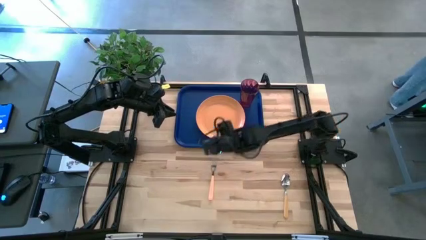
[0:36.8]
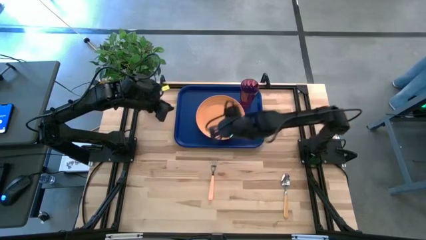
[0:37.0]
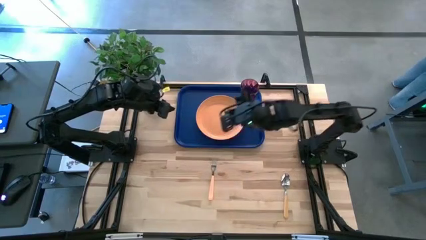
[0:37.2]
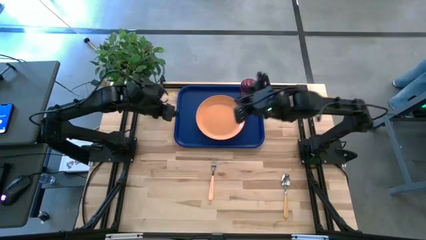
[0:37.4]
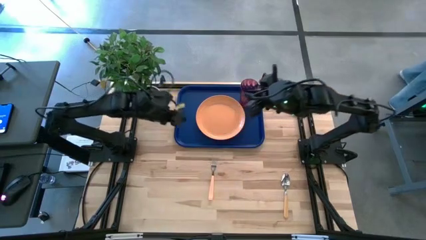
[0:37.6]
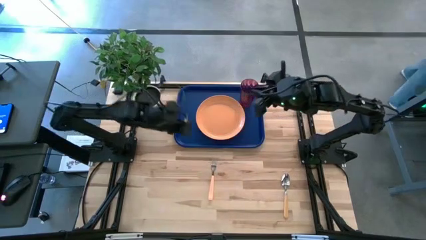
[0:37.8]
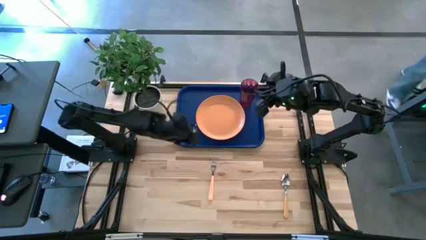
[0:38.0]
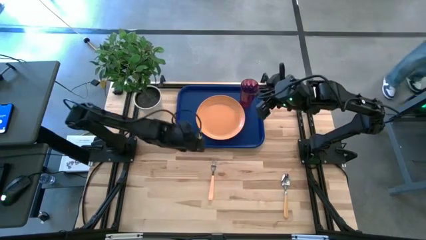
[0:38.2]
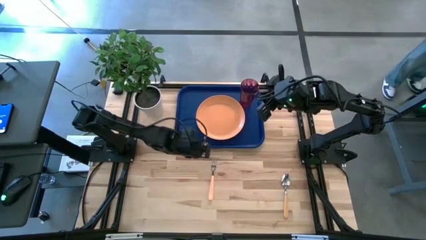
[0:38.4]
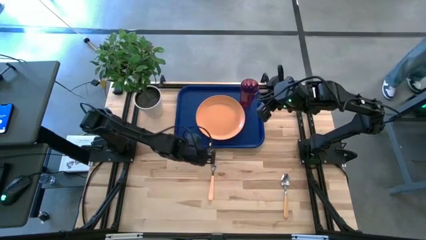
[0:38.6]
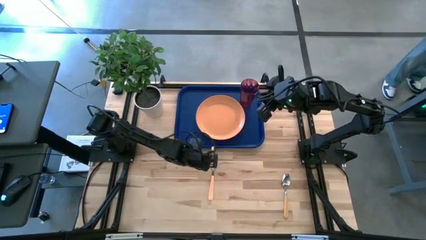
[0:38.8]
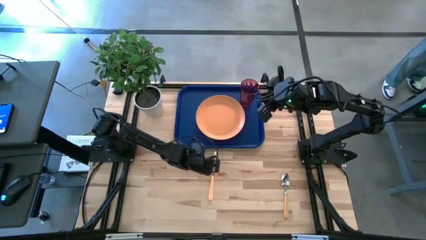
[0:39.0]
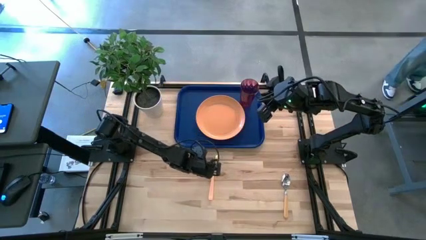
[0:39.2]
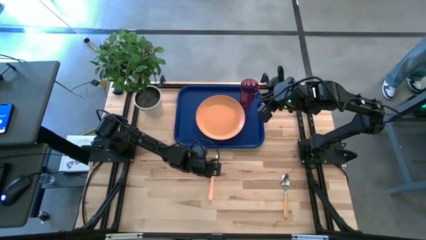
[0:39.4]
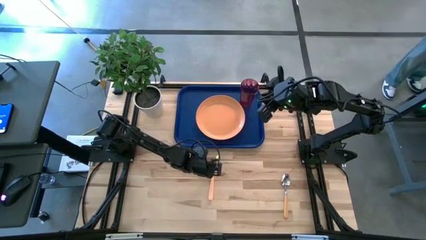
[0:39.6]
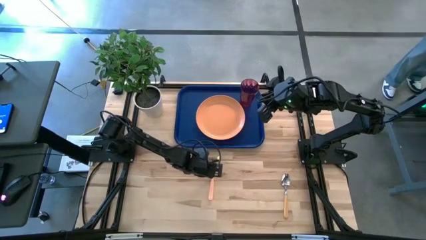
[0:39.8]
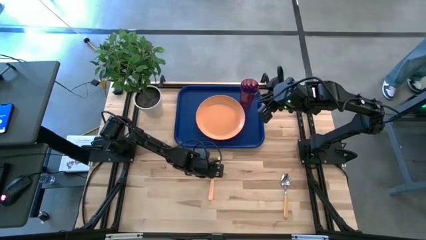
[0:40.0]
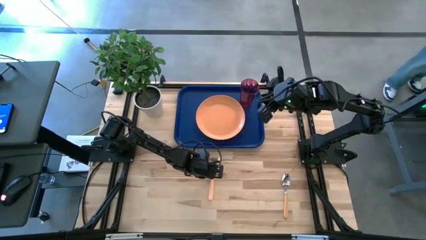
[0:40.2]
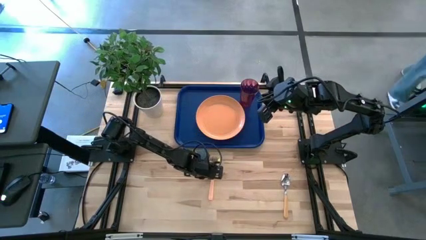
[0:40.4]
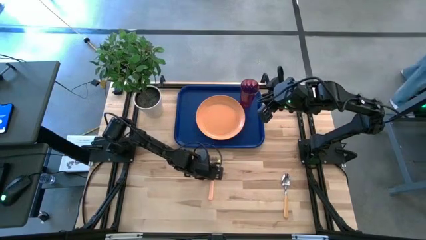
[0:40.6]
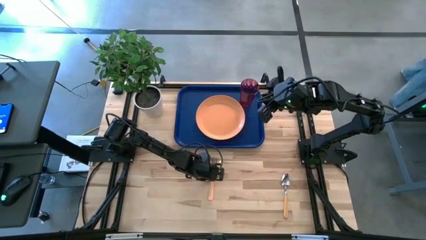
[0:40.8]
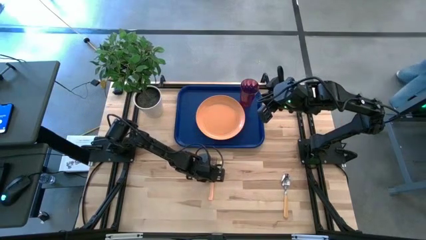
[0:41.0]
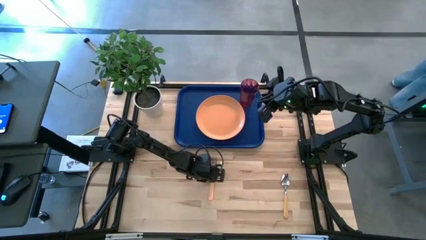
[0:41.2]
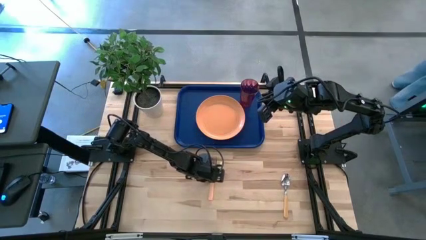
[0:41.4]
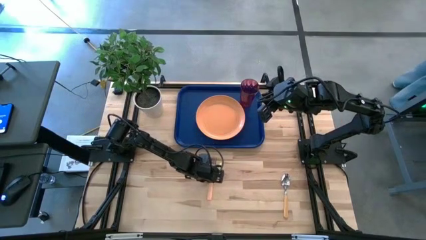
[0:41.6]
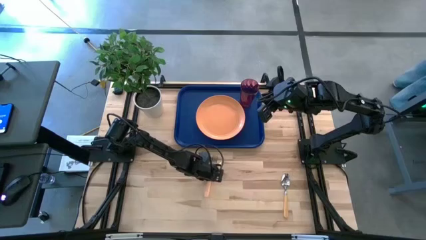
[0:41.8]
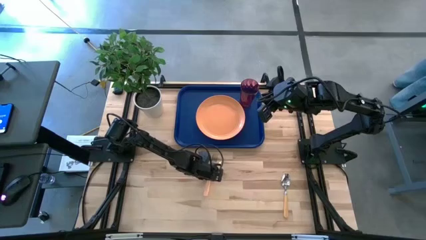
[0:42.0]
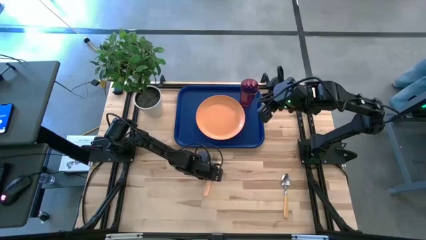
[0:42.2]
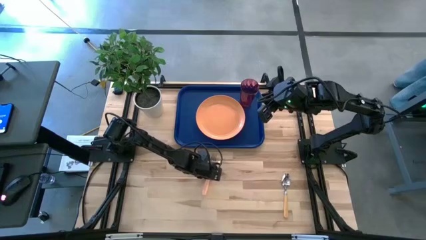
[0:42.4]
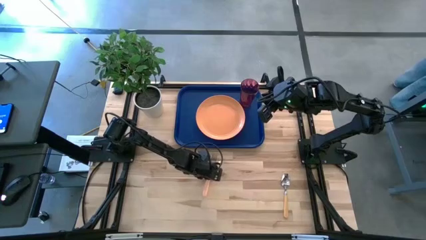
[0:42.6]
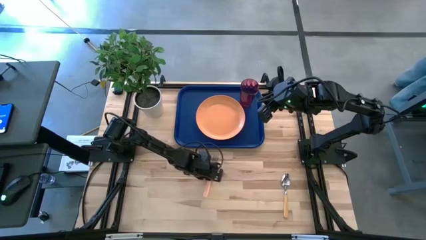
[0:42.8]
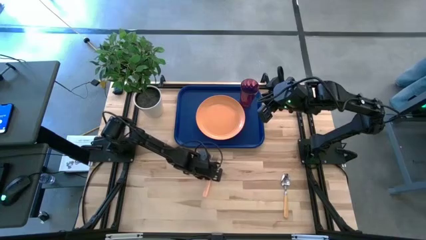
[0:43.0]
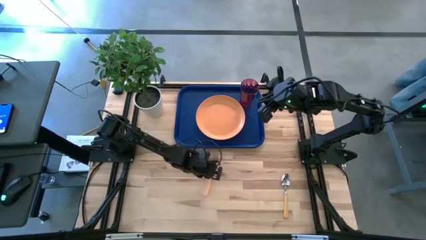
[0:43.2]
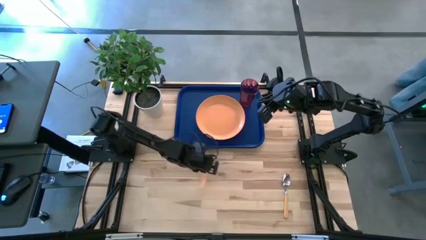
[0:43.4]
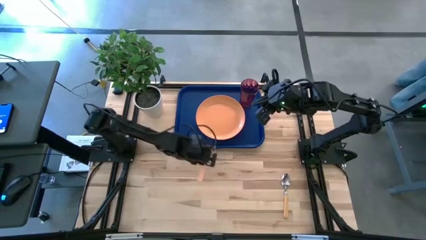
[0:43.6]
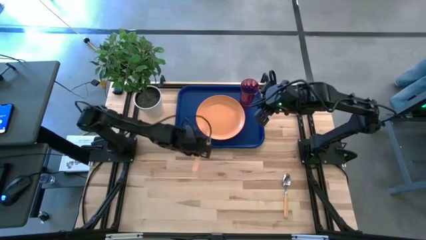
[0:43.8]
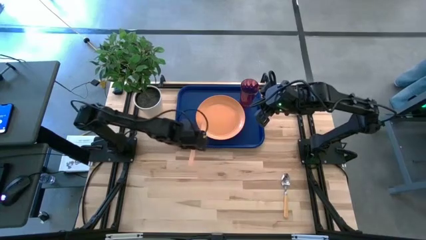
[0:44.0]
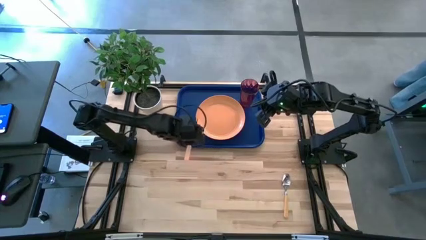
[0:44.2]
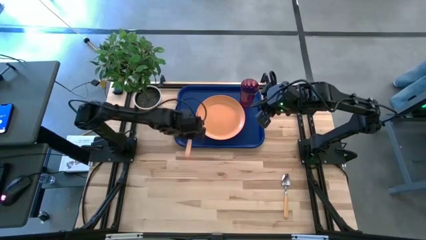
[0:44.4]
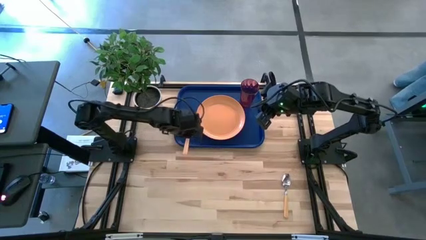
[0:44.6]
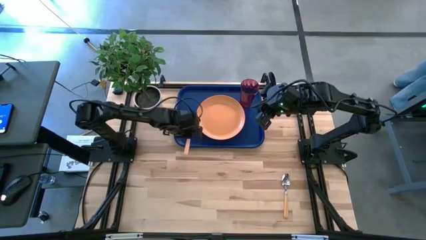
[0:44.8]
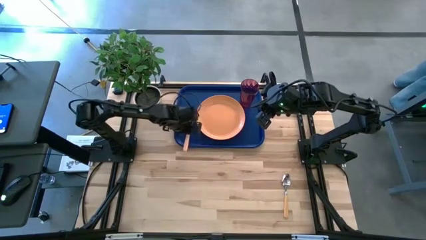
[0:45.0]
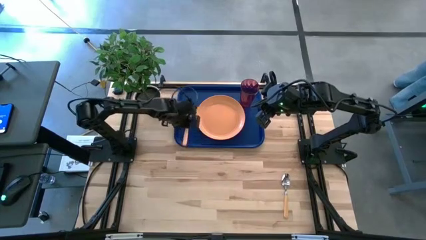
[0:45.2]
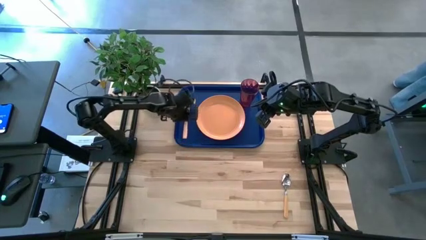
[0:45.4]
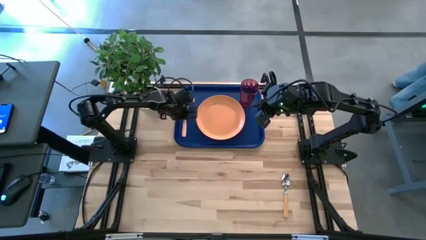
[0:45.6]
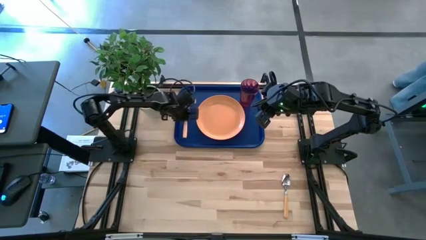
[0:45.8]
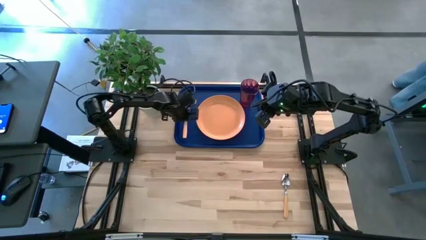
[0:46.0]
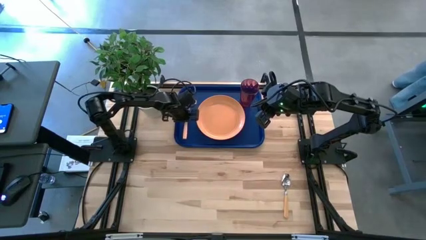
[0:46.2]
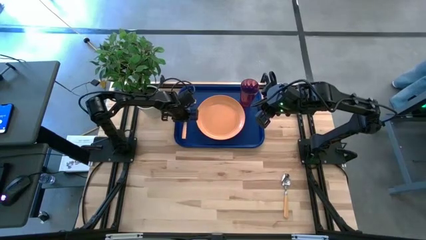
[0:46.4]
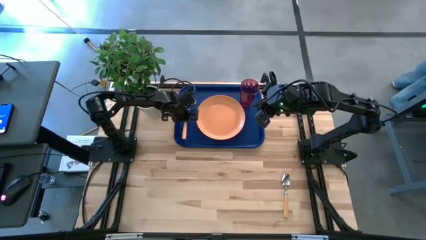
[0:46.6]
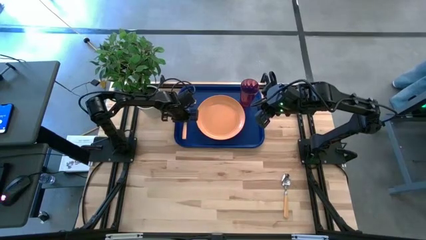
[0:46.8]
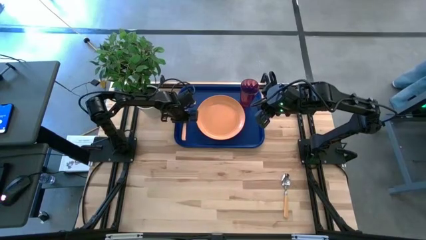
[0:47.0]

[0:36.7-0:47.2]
Task: Pick and place plate/cup/fork/spoon on tray
Put the fork on the tray to the left of the plate
